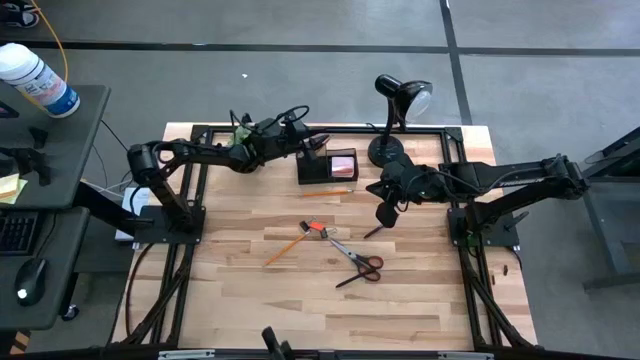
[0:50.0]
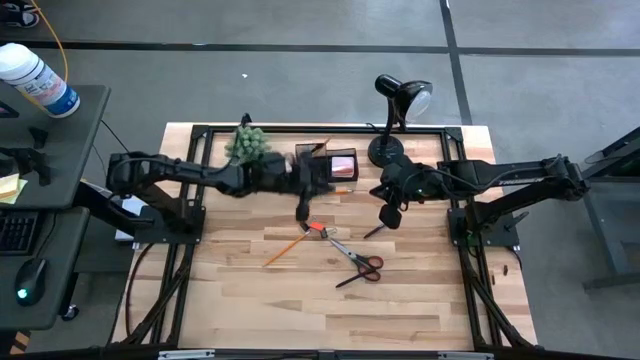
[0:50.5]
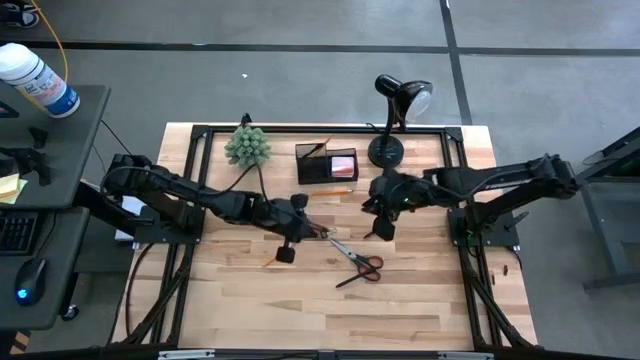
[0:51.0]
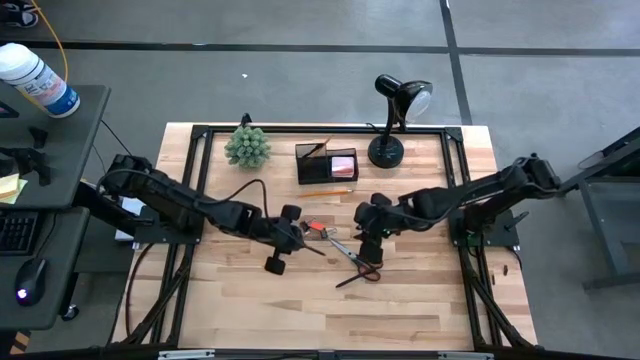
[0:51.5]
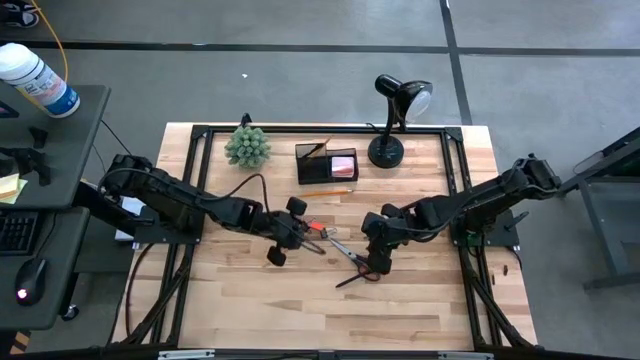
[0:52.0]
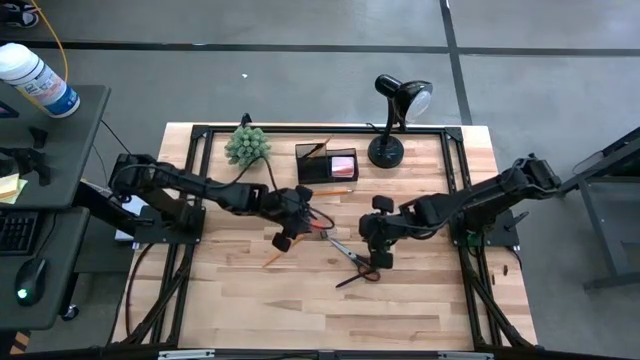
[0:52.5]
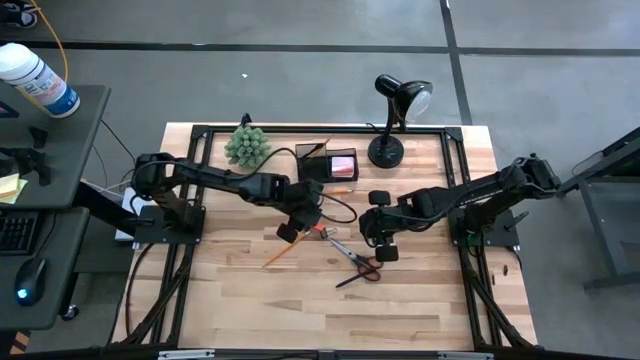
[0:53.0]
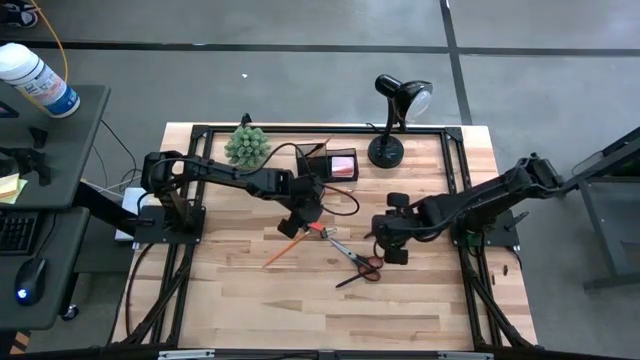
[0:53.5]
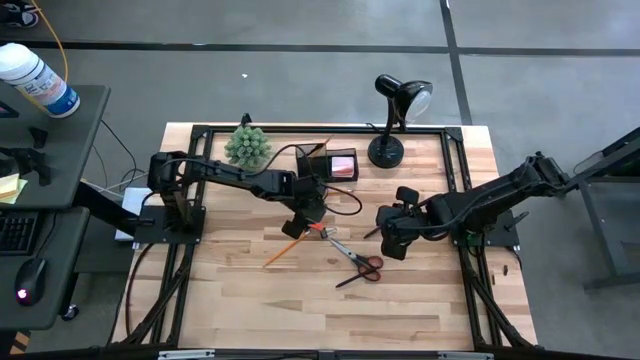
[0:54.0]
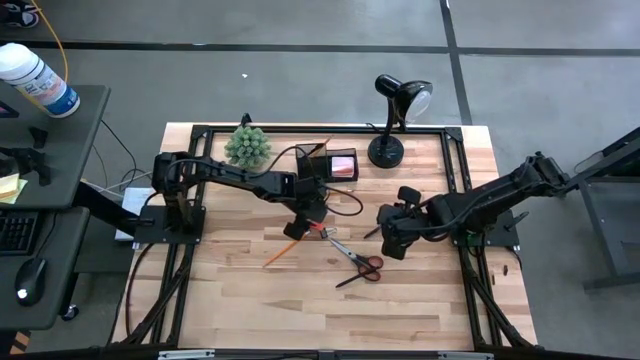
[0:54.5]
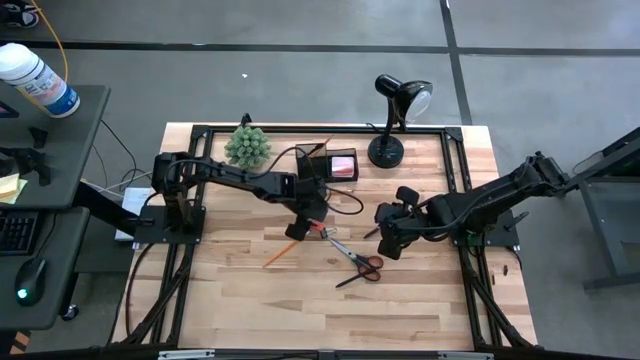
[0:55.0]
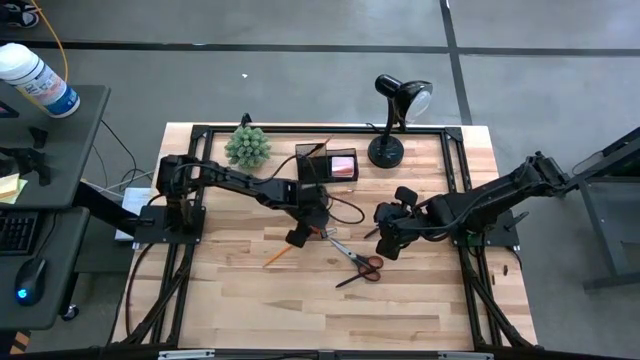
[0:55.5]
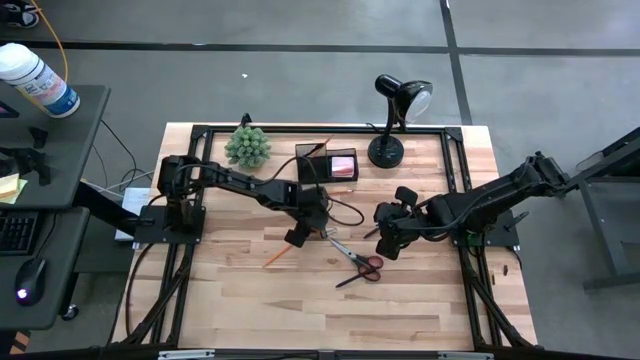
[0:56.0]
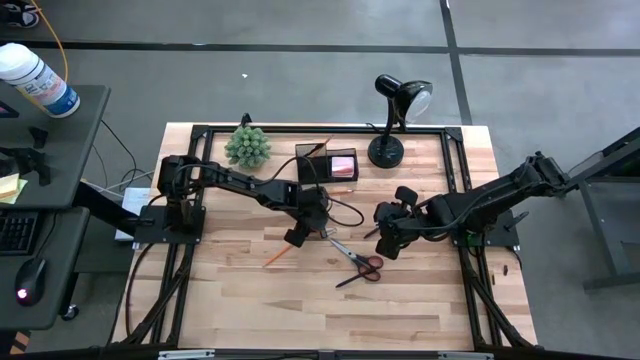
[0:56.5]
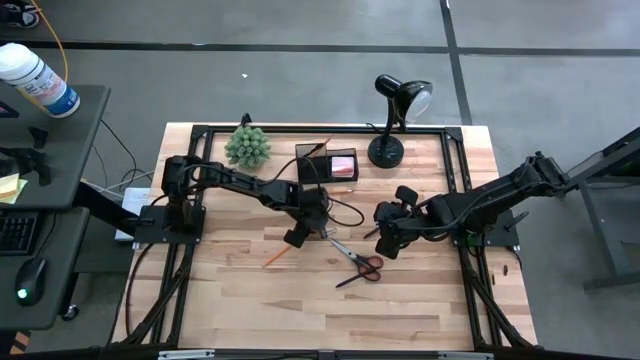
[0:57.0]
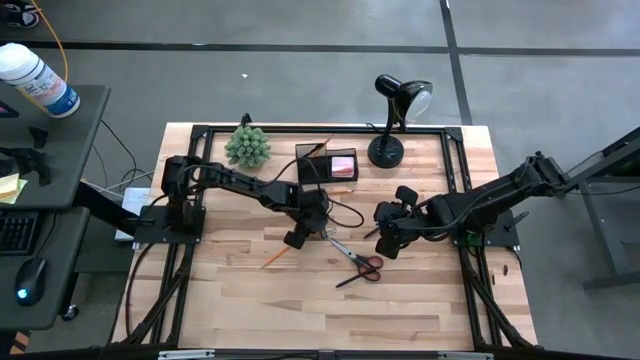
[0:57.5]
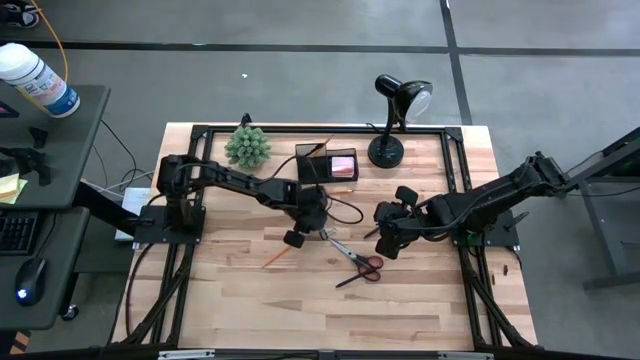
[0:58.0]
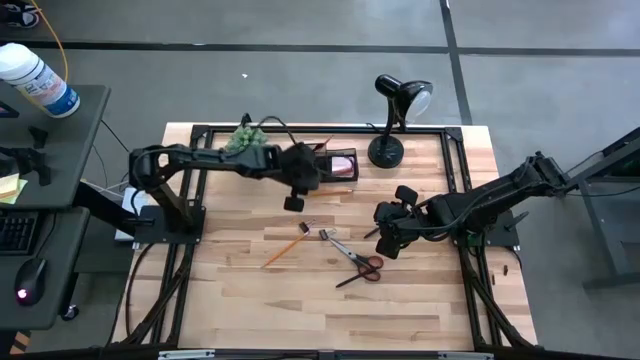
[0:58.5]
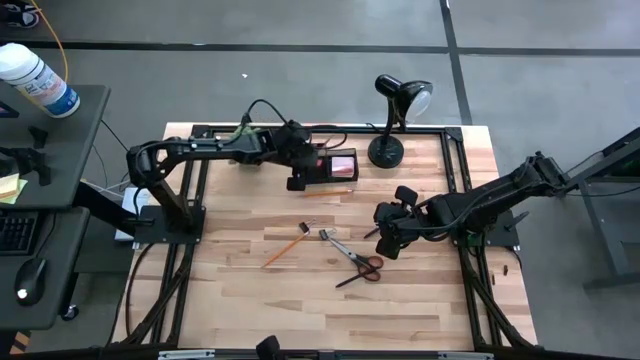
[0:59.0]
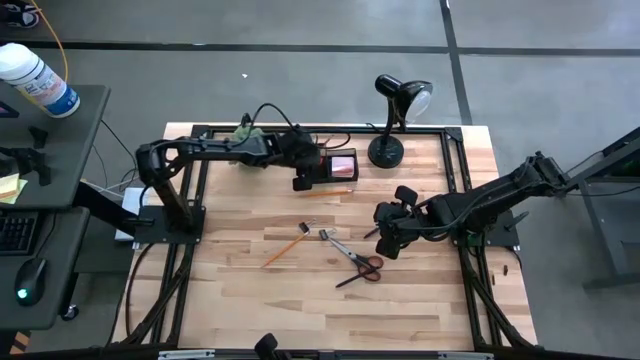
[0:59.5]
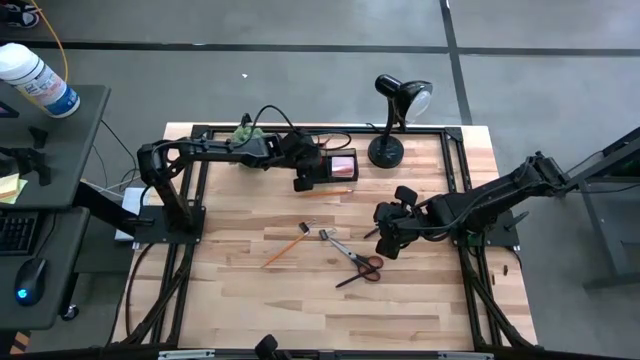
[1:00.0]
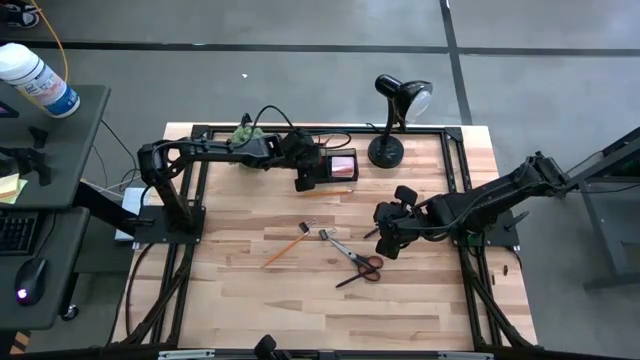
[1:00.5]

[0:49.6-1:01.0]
Task: Pick and place office supplies into organizer
Put the orange eraser into the black desk organizer

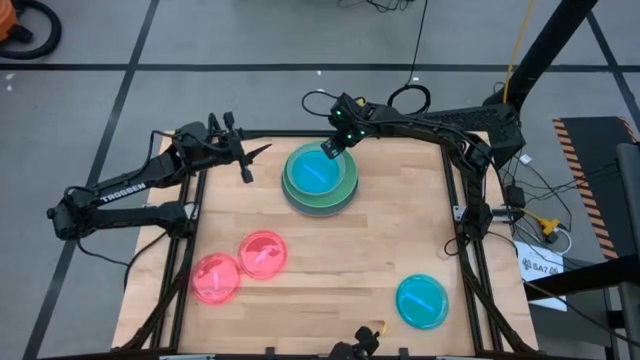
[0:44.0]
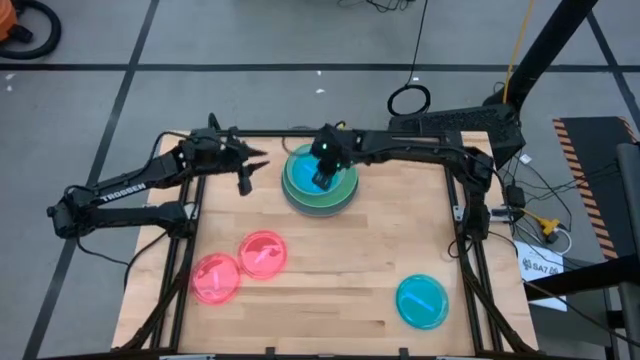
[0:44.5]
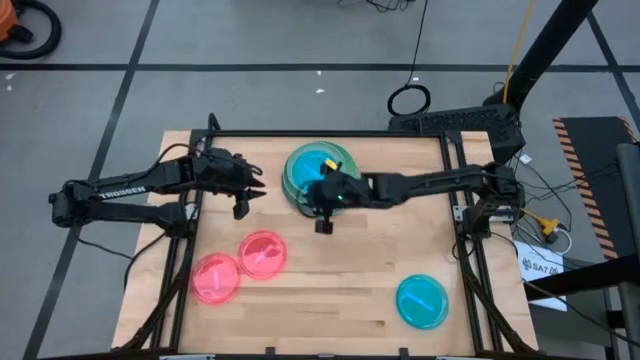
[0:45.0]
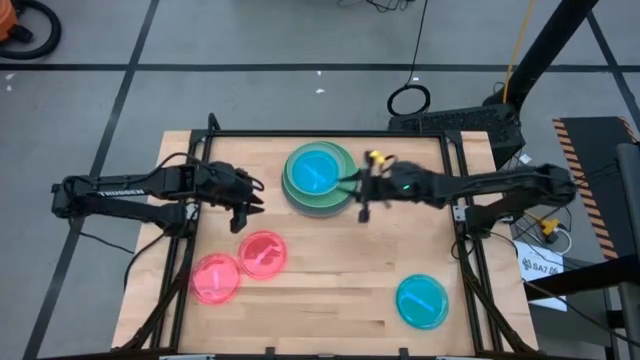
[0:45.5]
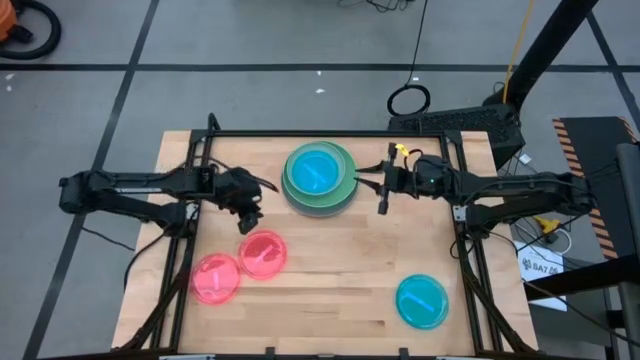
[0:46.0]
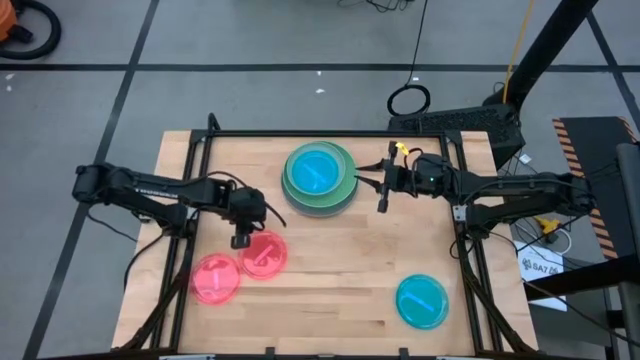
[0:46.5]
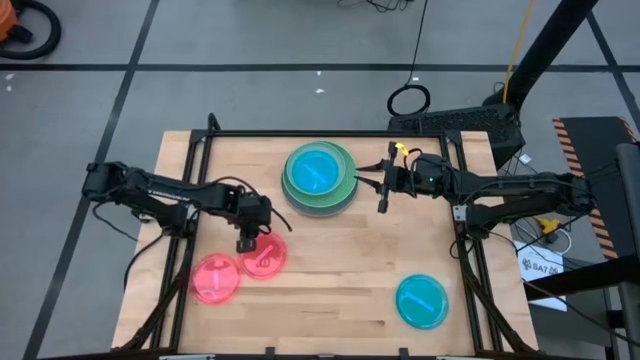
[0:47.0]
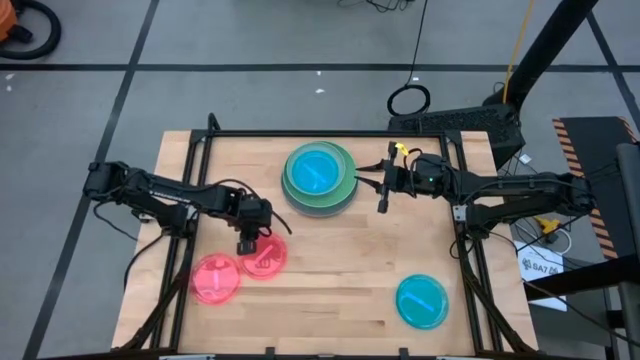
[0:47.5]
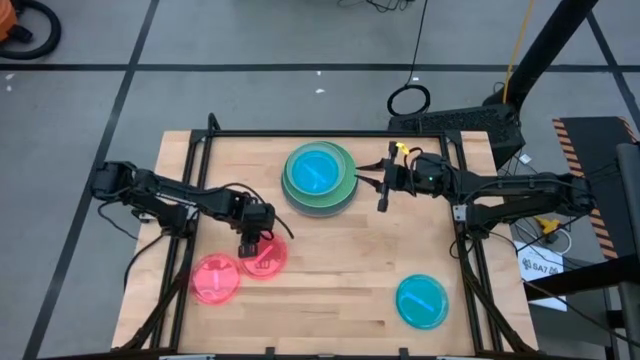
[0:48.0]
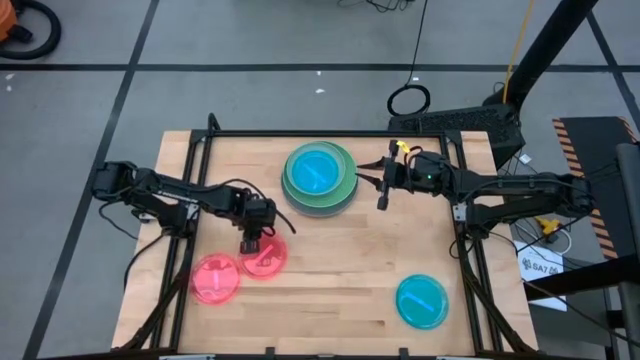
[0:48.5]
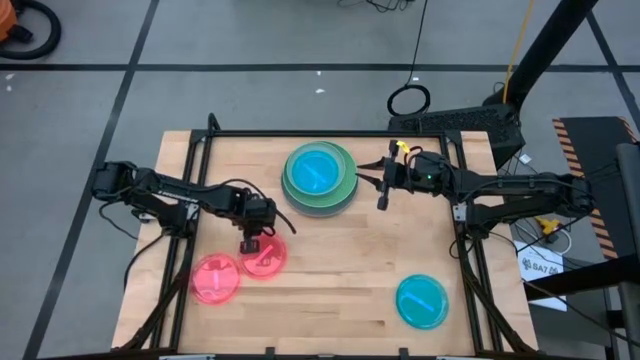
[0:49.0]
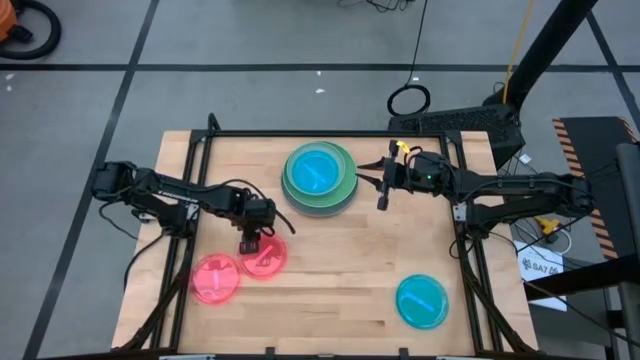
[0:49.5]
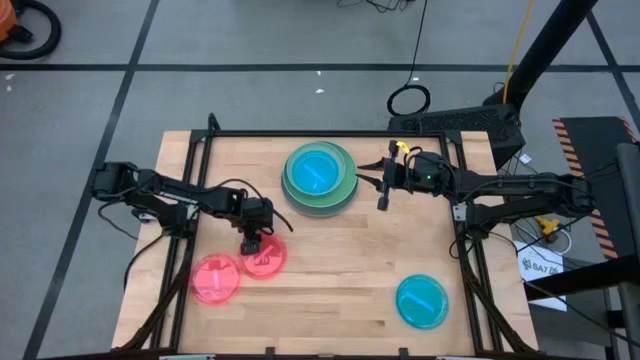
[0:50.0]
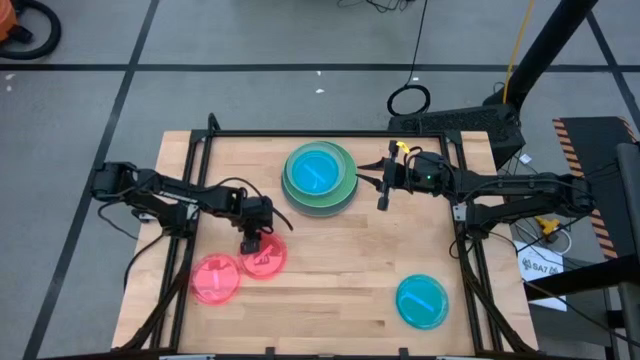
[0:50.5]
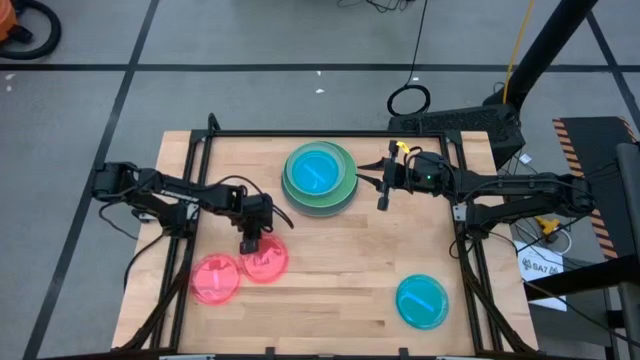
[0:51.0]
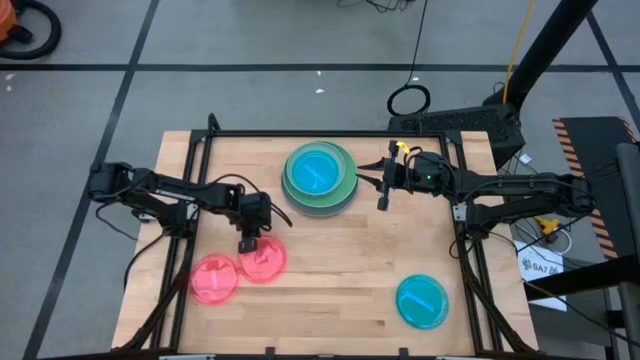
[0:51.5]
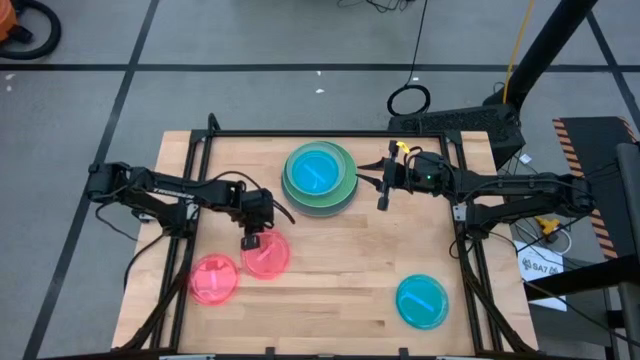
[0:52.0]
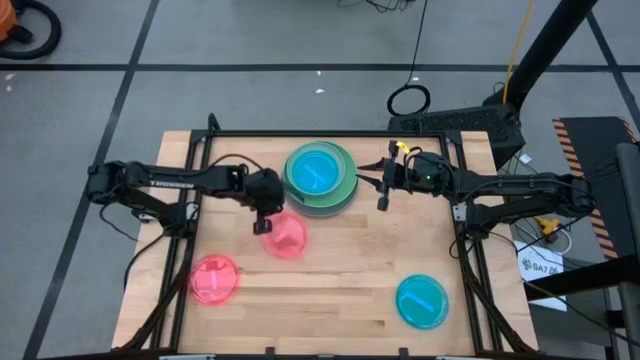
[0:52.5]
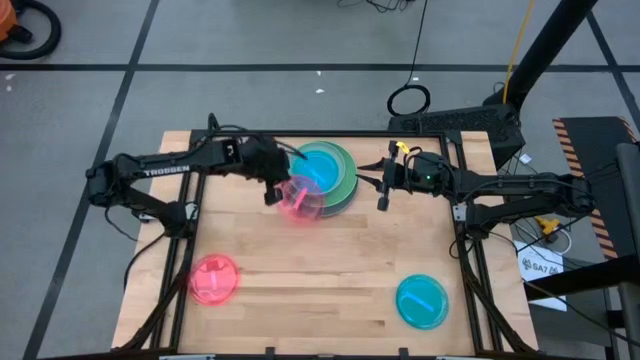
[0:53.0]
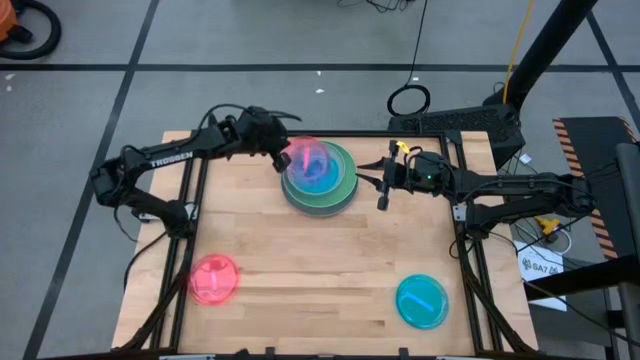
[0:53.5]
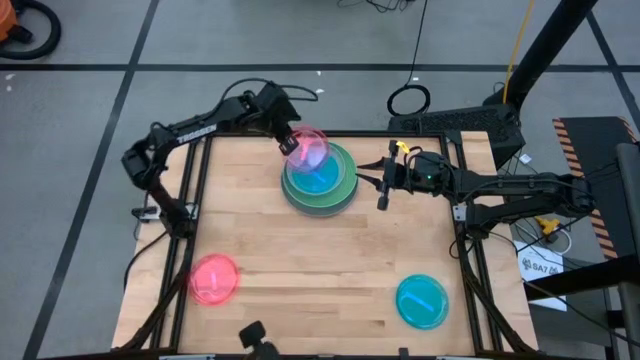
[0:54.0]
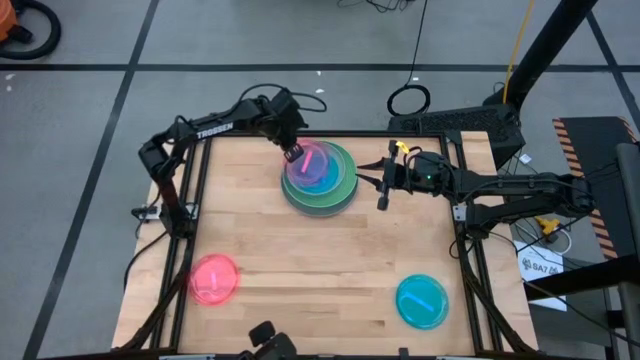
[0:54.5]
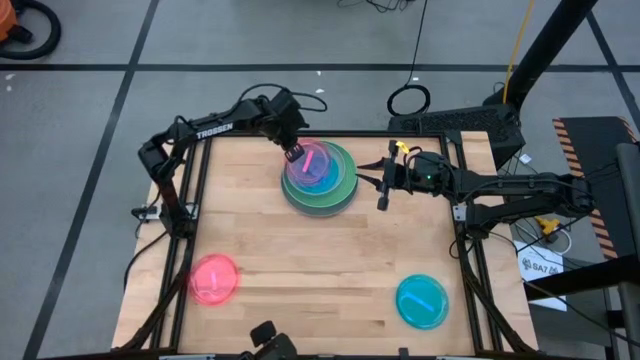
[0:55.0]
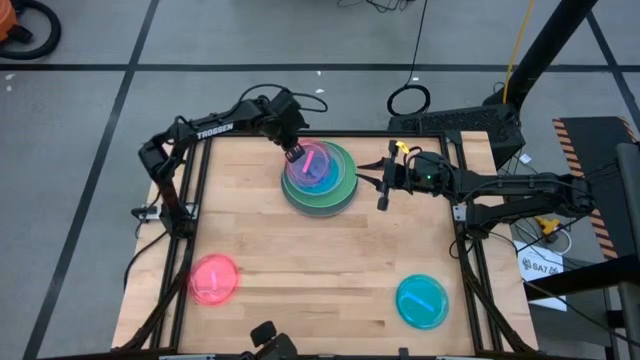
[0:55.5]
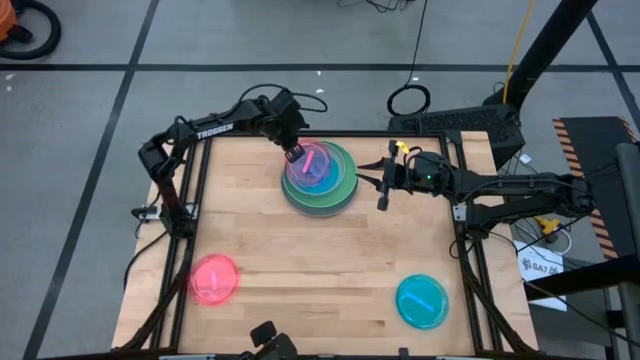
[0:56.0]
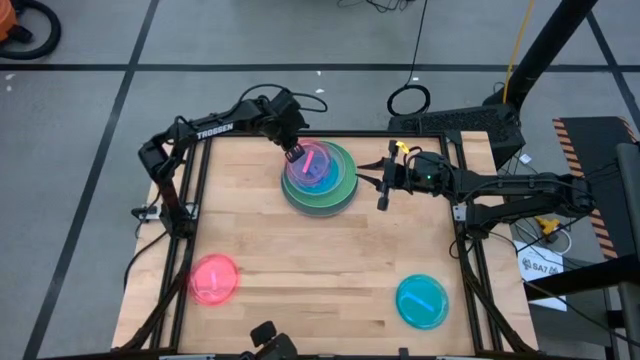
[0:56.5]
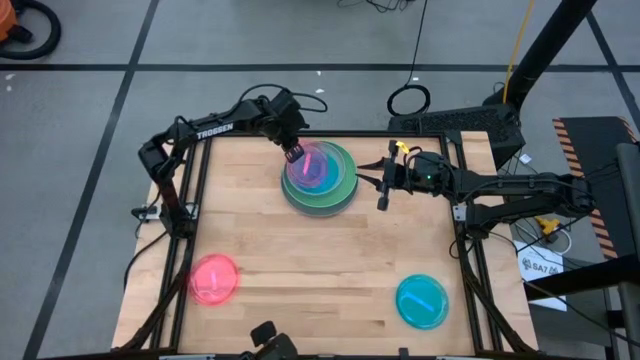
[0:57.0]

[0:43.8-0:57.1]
Task: Stack plastic plates
Stack the pink plate on the blue plate
